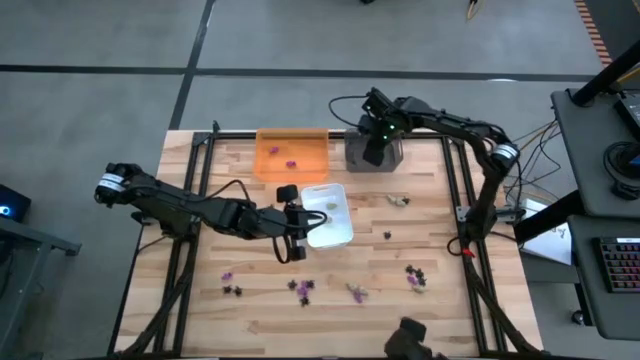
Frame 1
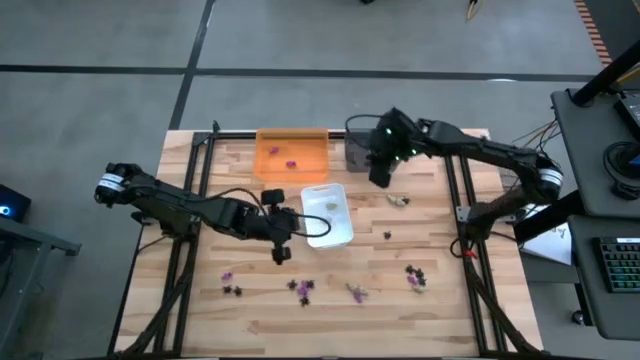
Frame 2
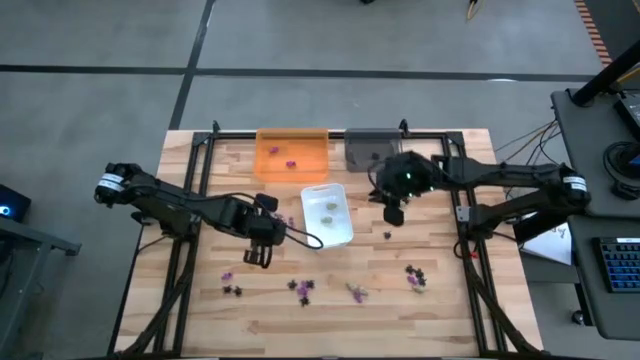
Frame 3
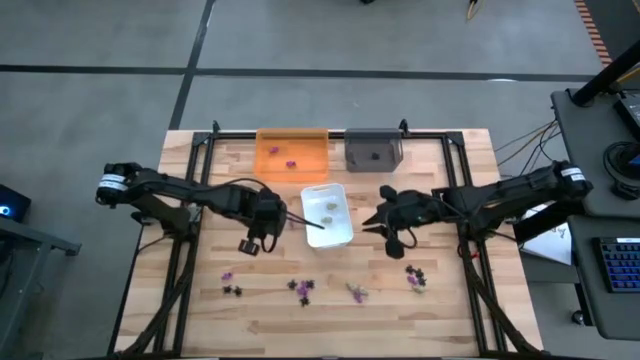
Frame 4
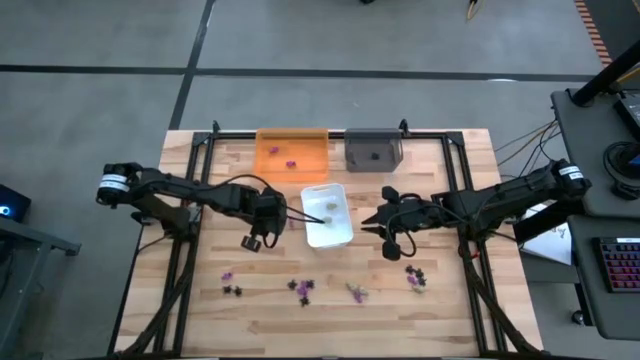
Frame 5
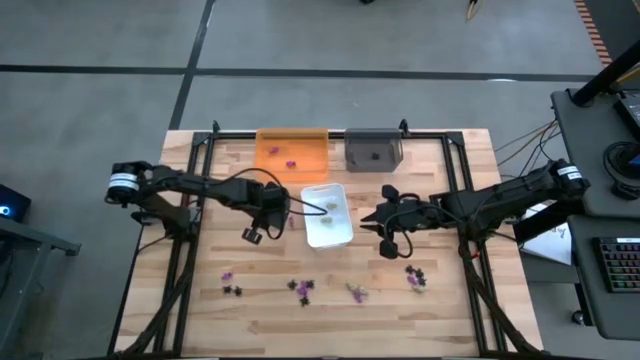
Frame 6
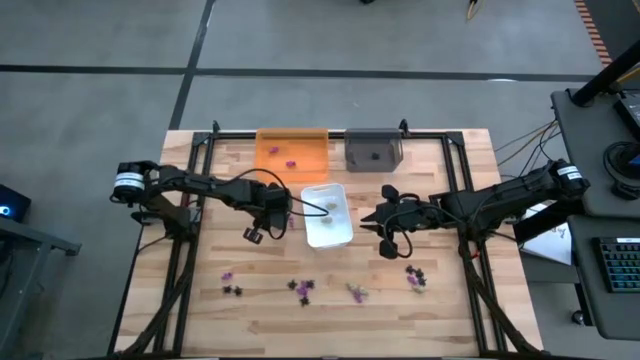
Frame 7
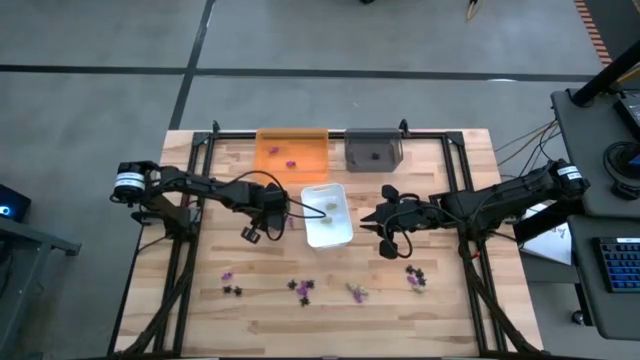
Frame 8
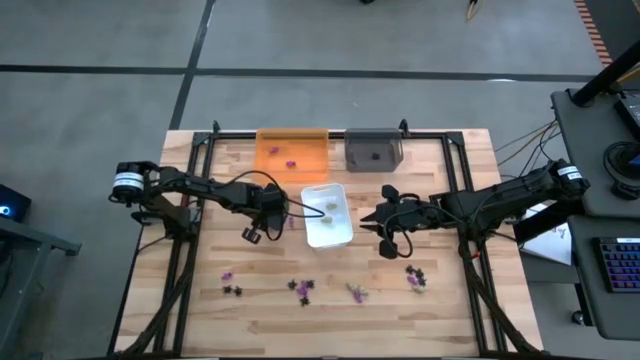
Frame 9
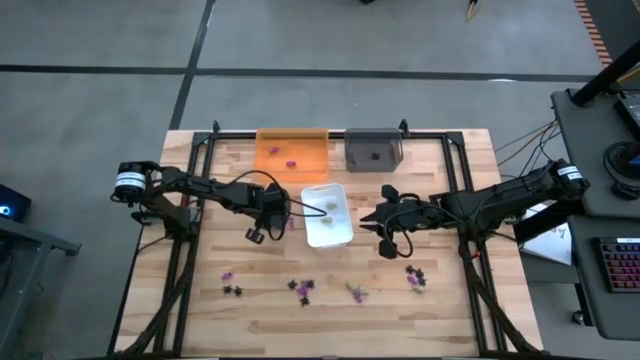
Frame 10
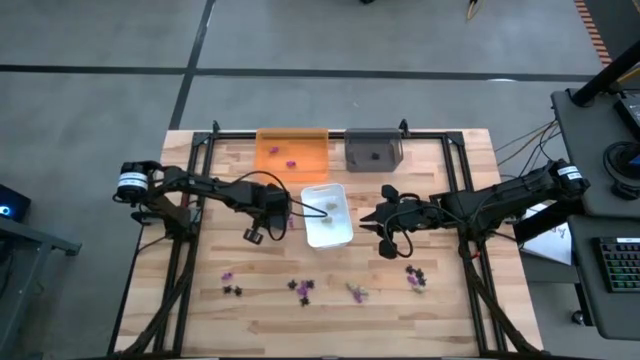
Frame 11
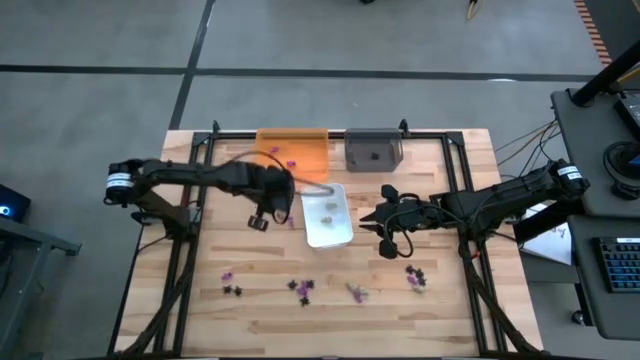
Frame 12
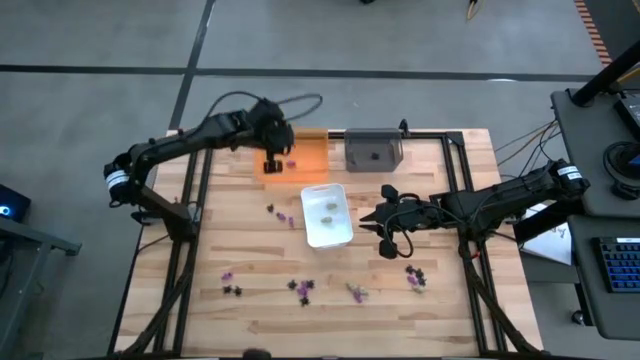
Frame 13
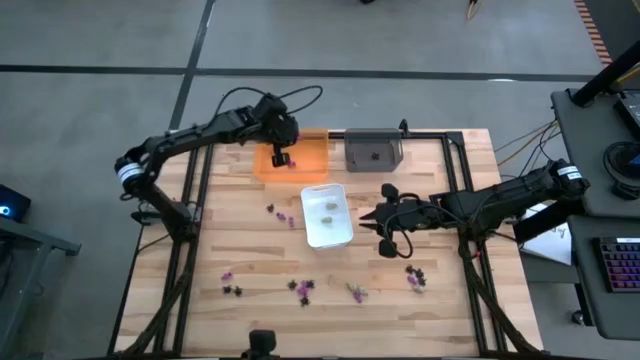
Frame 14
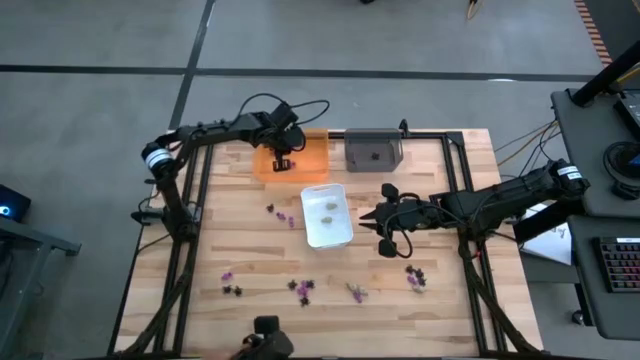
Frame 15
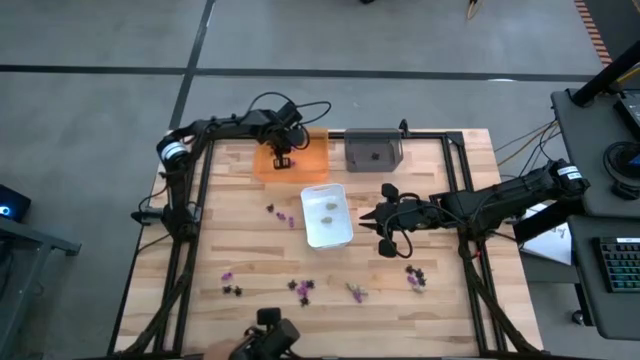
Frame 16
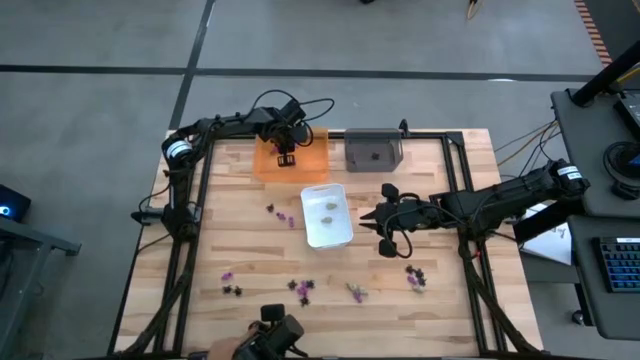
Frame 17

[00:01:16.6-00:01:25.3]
Task: Sort Halloween decoration
Put the purple skeleton toy into the orange bin

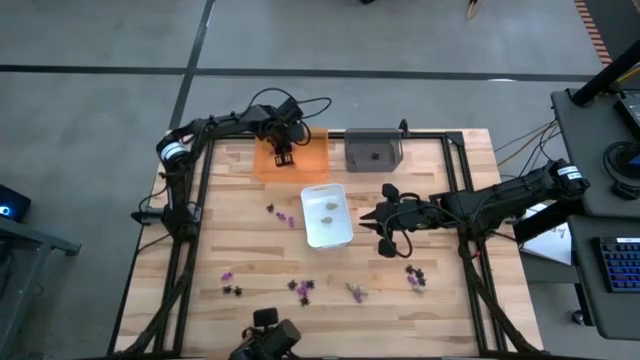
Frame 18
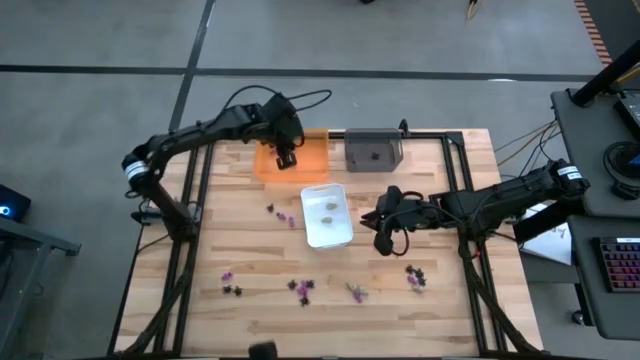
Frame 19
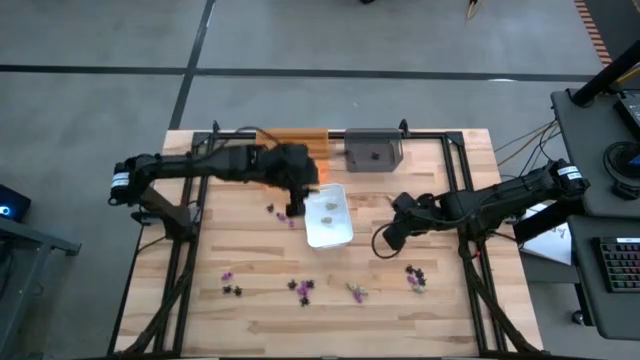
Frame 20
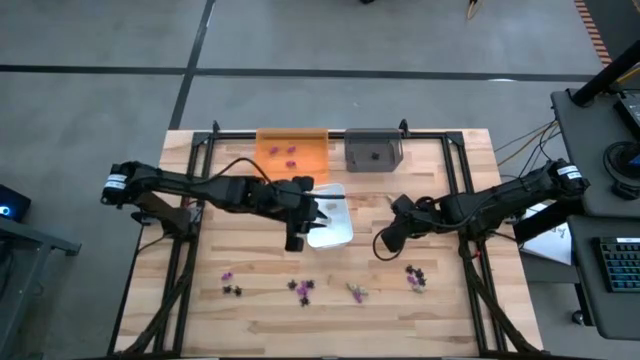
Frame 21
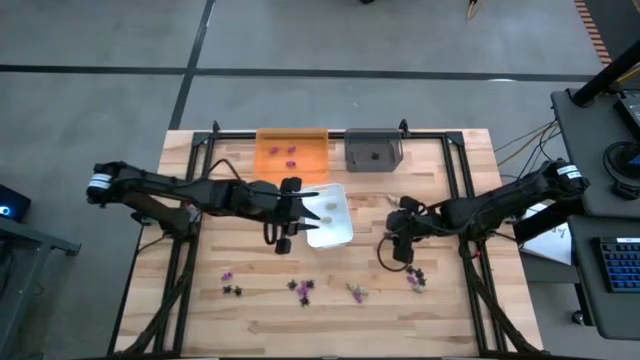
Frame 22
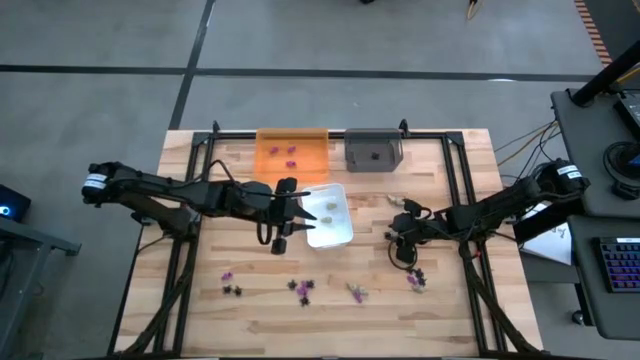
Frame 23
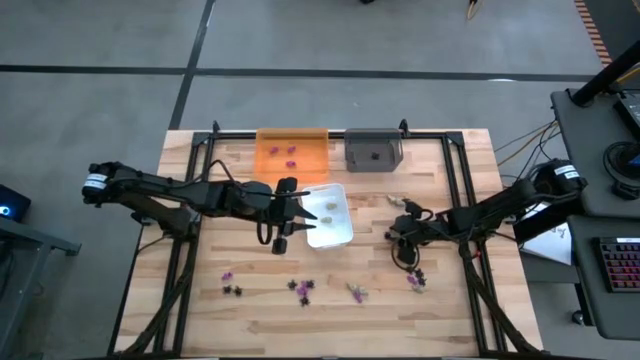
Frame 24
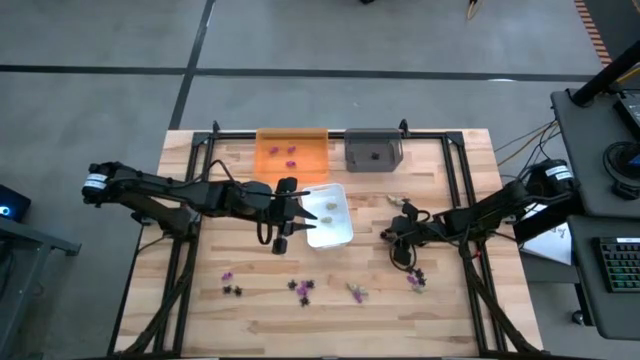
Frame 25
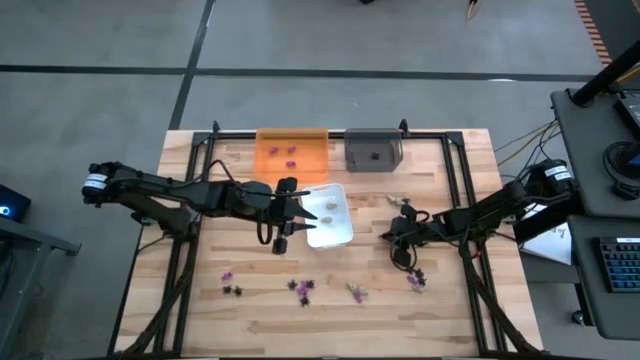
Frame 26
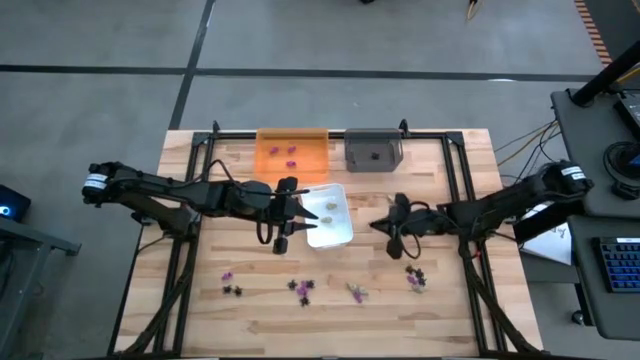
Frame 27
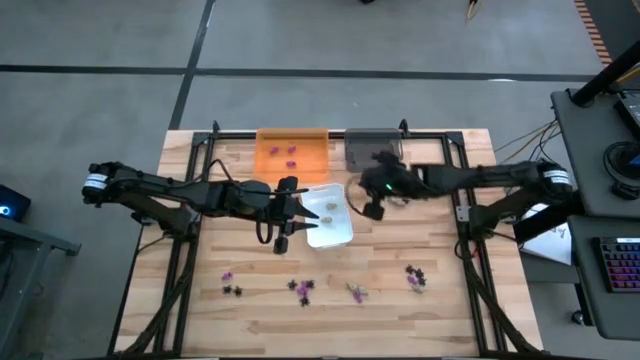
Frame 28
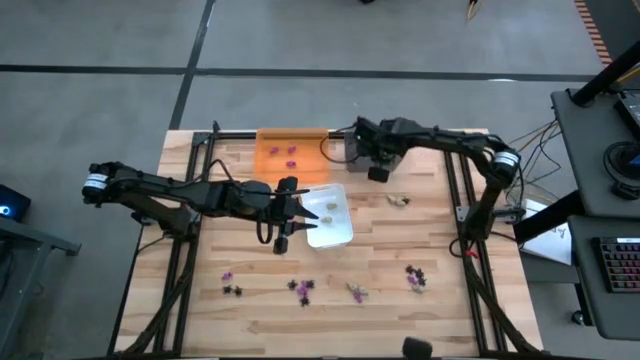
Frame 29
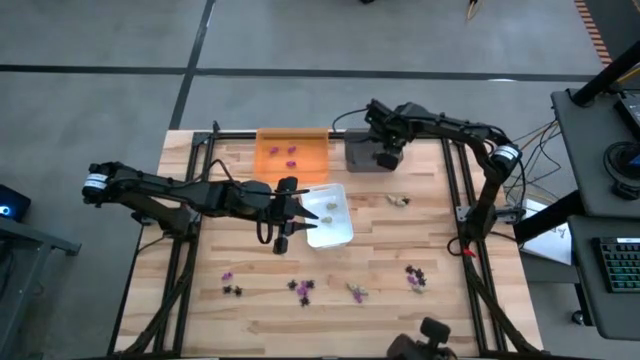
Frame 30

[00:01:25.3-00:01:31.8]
Put the black spider toy into the black bin

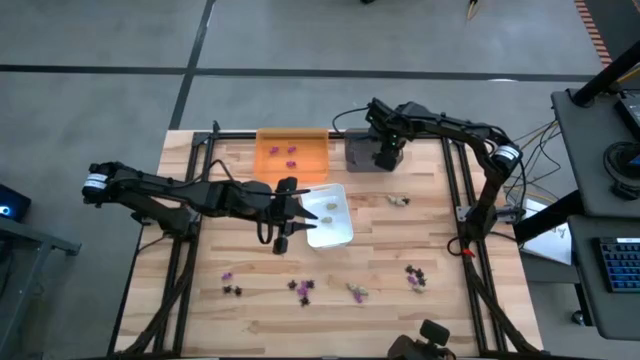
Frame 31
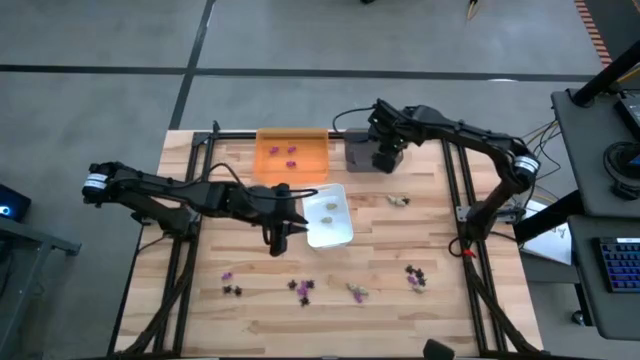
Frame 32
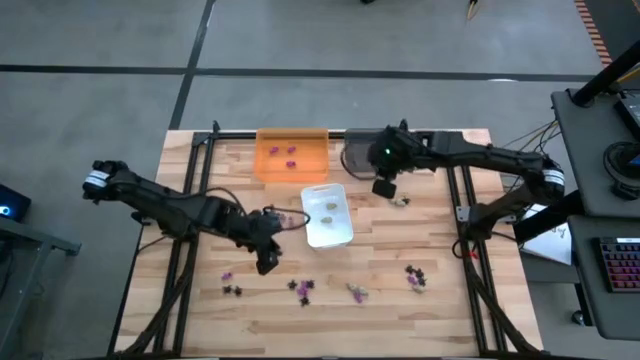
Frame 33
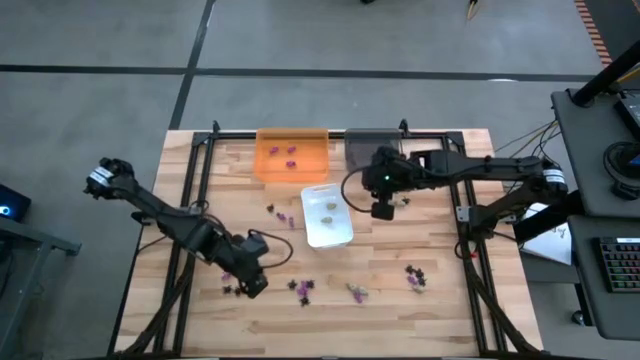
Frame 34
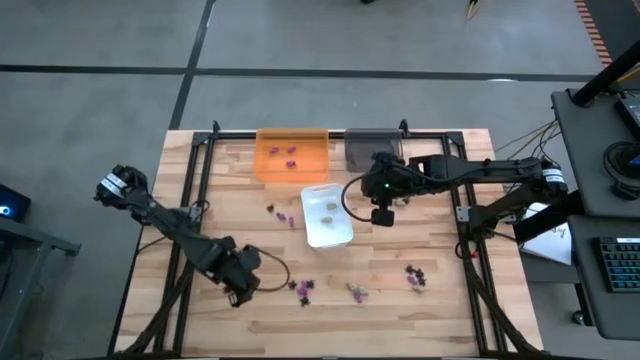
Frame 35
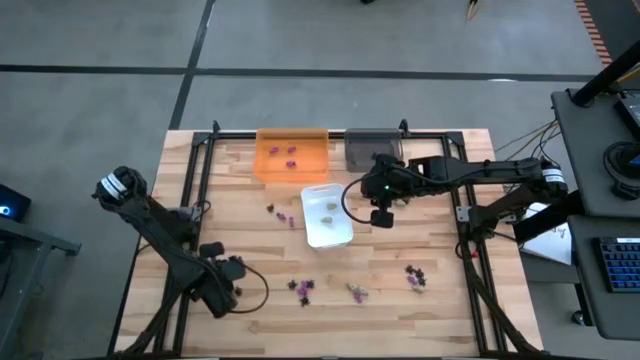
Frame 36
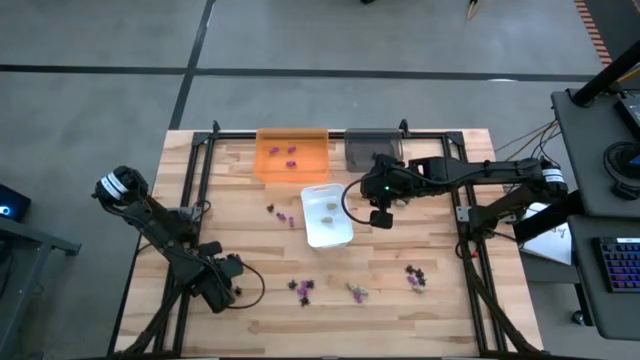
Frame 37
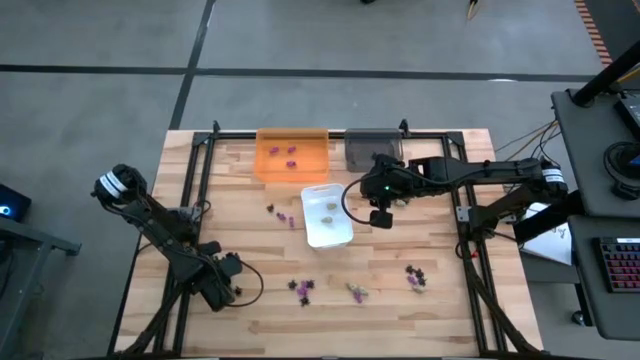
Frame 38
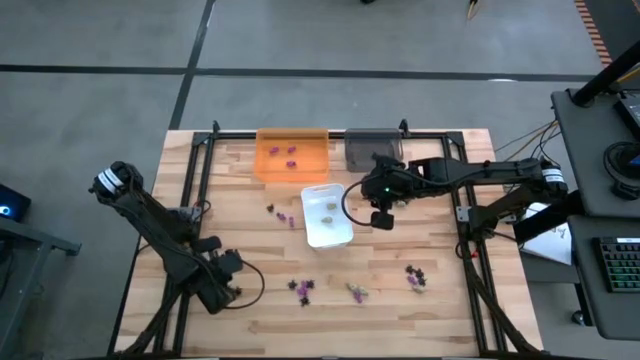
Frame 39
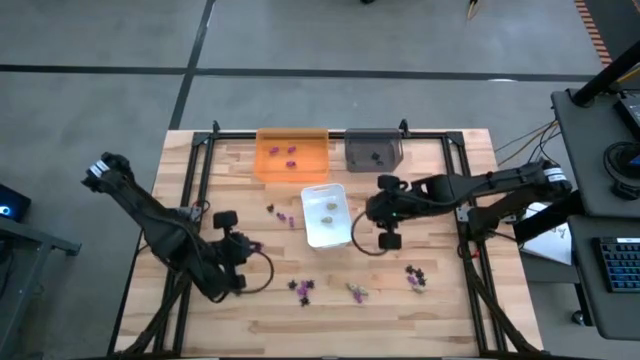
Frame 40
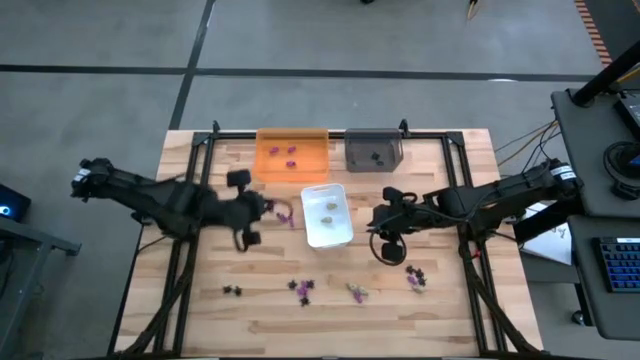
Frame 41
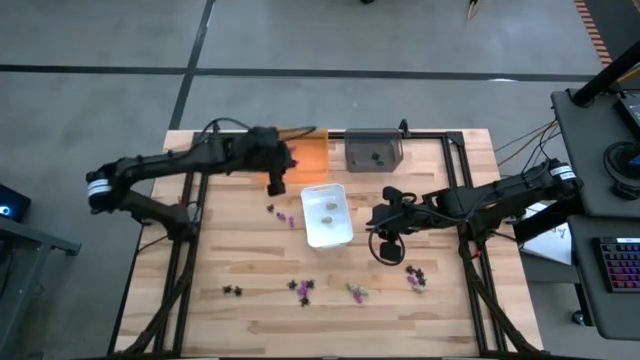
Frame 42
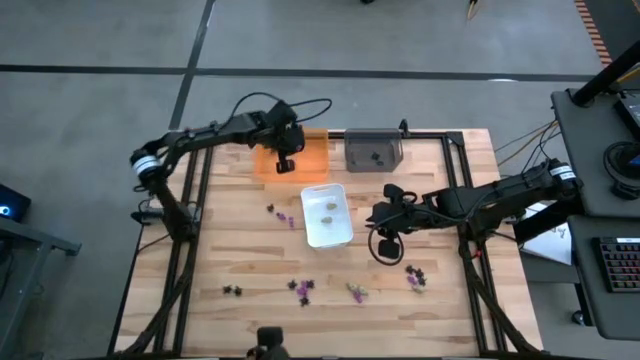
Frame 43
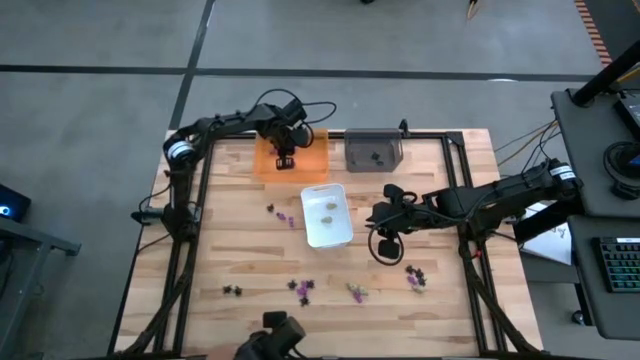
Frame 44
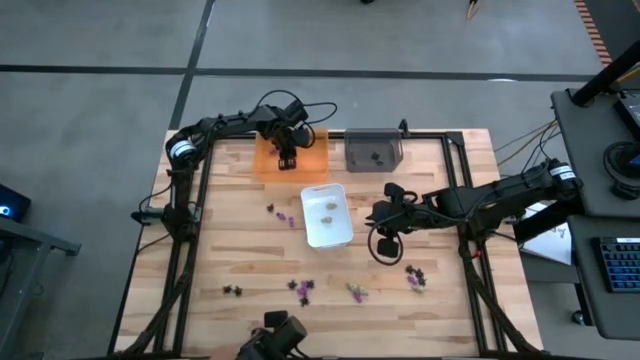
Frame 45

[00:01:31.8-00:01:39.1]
Put the purple skeleton toy into the orange bin
